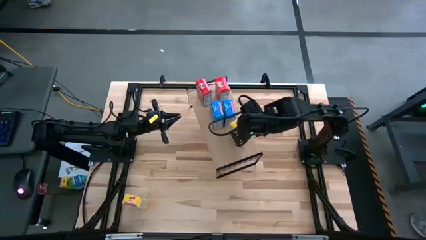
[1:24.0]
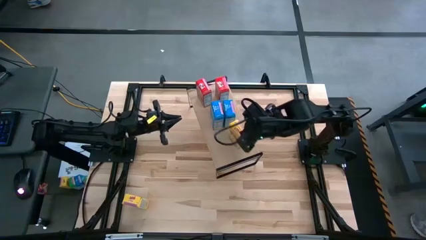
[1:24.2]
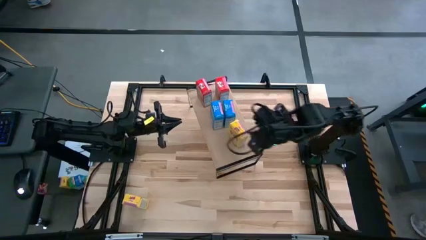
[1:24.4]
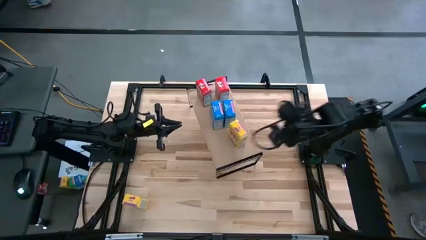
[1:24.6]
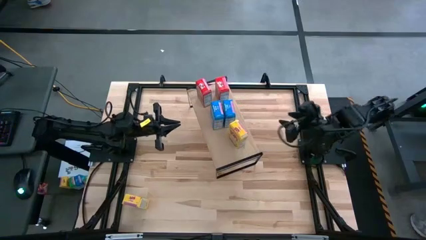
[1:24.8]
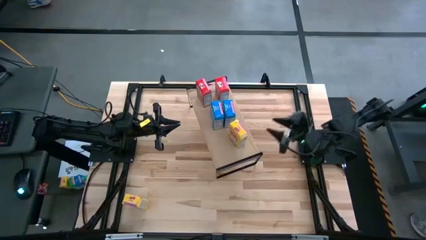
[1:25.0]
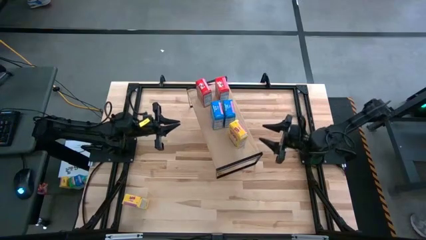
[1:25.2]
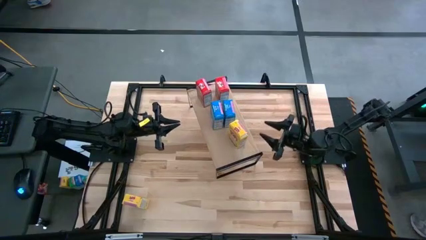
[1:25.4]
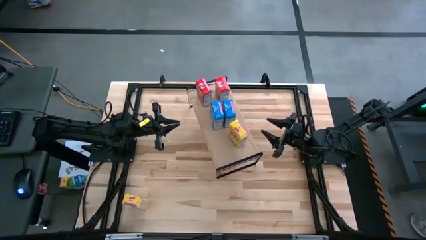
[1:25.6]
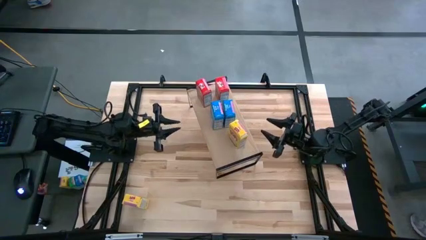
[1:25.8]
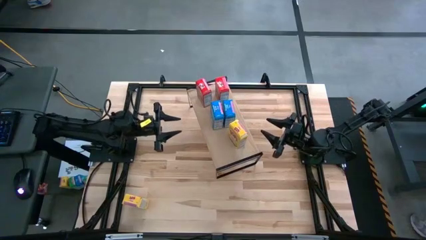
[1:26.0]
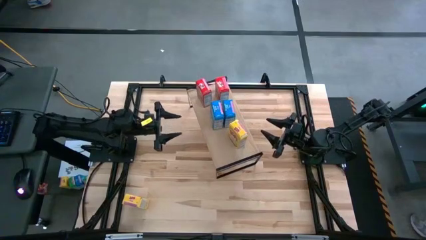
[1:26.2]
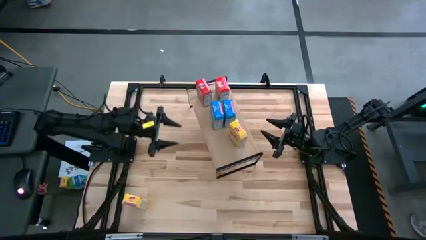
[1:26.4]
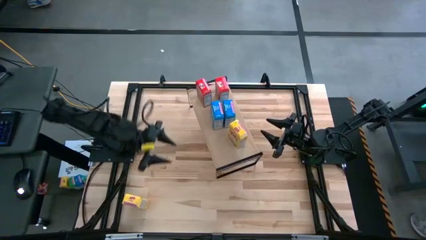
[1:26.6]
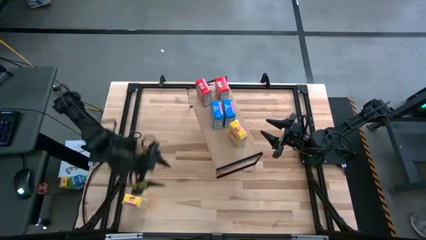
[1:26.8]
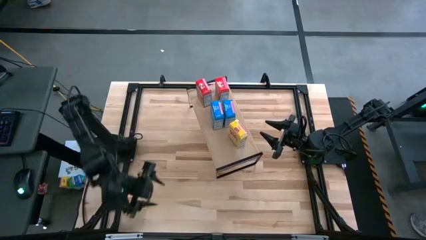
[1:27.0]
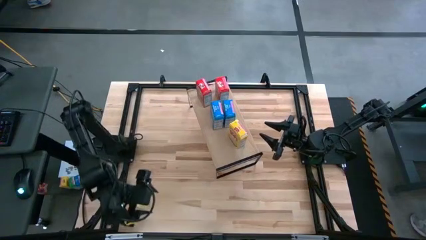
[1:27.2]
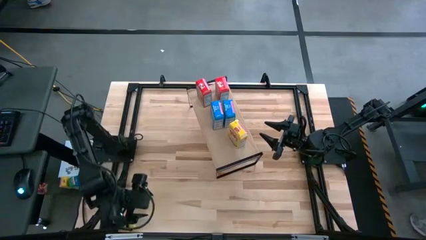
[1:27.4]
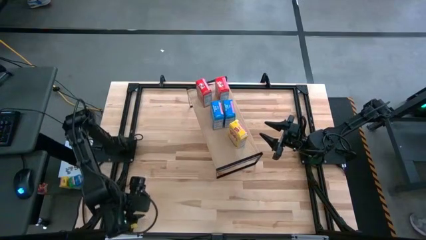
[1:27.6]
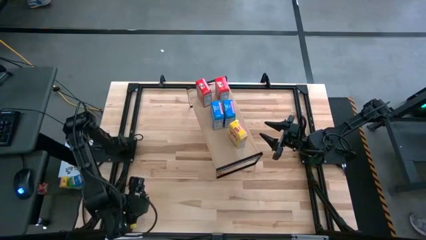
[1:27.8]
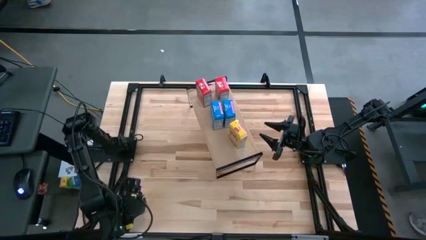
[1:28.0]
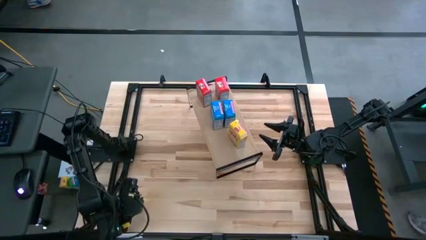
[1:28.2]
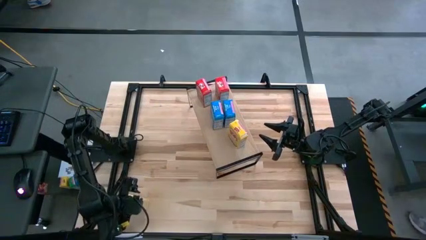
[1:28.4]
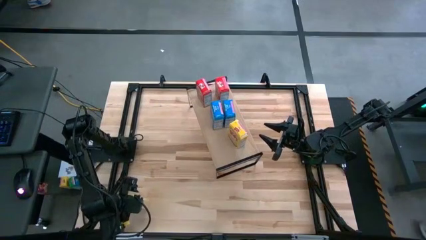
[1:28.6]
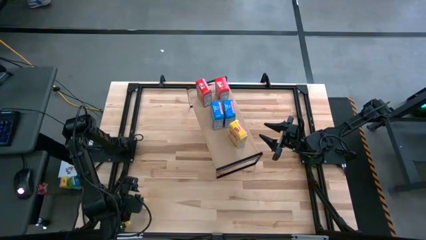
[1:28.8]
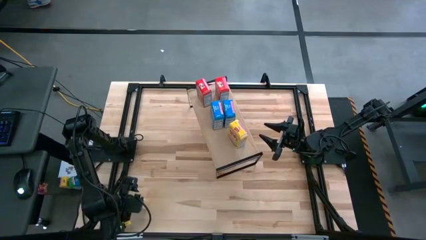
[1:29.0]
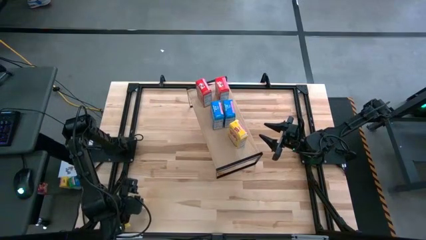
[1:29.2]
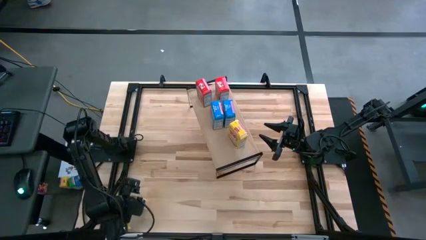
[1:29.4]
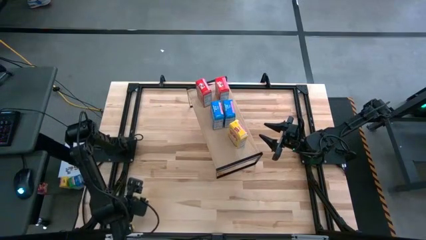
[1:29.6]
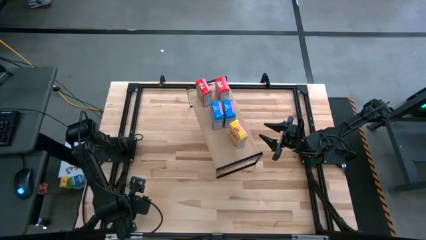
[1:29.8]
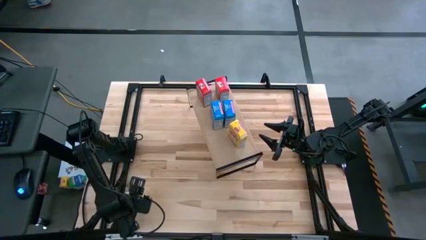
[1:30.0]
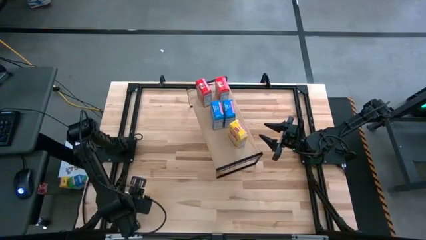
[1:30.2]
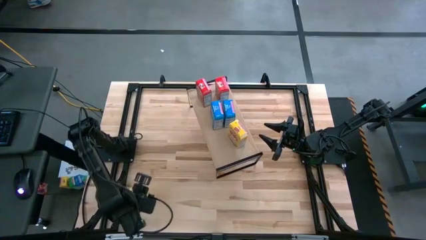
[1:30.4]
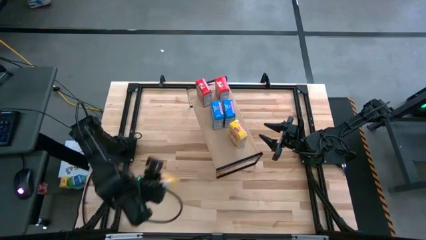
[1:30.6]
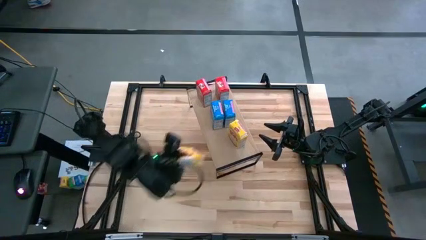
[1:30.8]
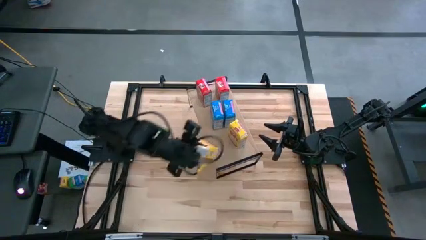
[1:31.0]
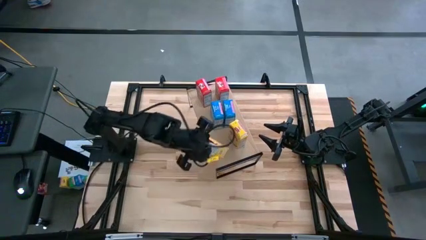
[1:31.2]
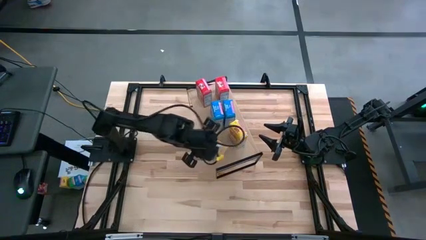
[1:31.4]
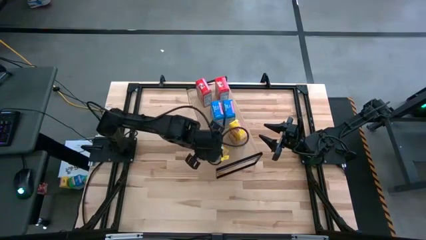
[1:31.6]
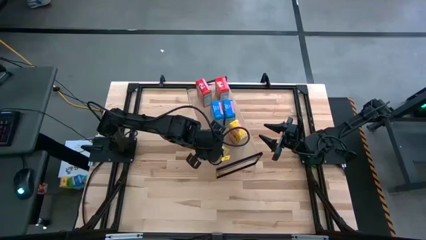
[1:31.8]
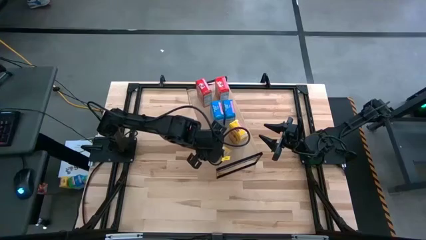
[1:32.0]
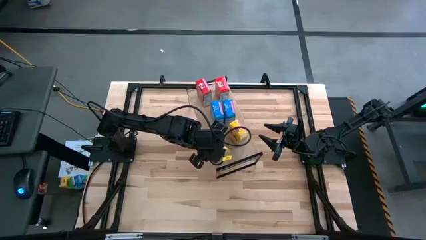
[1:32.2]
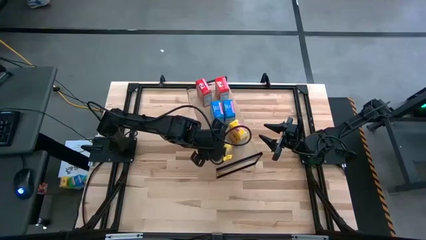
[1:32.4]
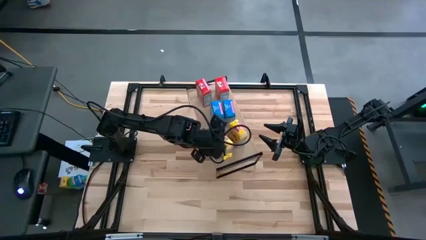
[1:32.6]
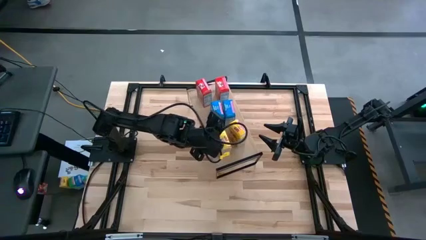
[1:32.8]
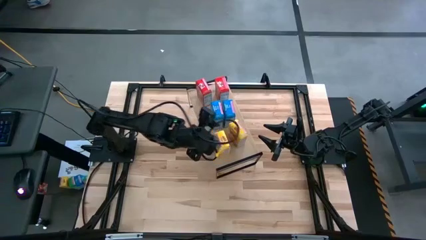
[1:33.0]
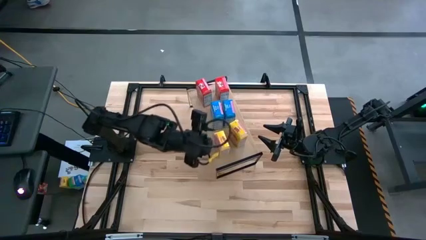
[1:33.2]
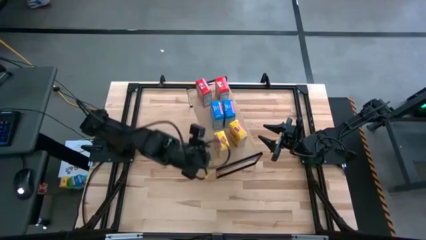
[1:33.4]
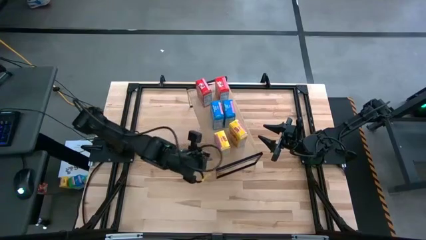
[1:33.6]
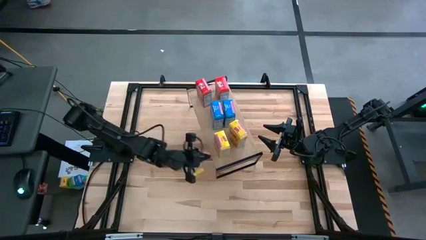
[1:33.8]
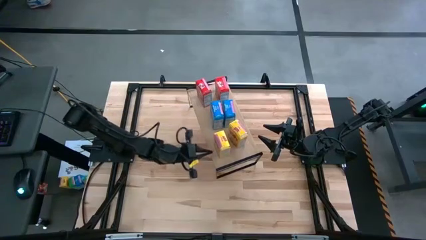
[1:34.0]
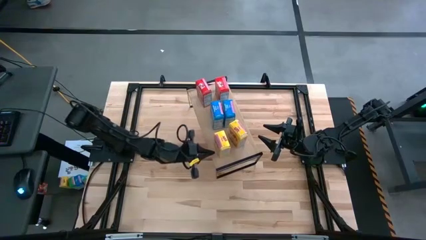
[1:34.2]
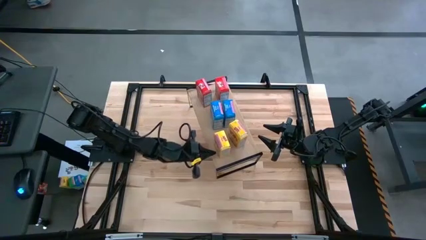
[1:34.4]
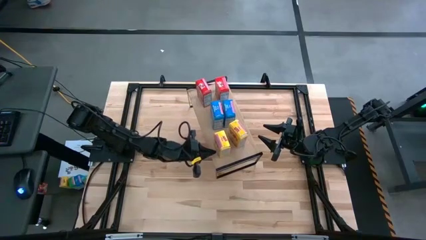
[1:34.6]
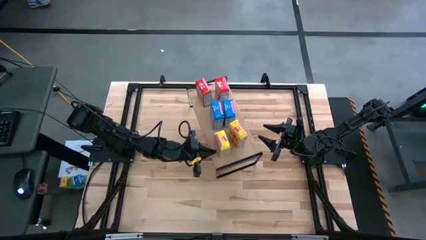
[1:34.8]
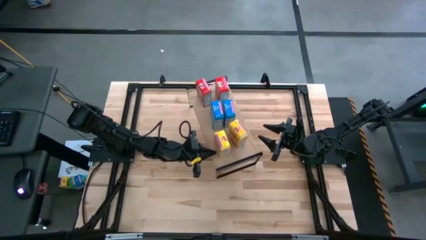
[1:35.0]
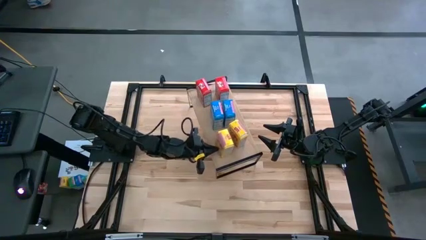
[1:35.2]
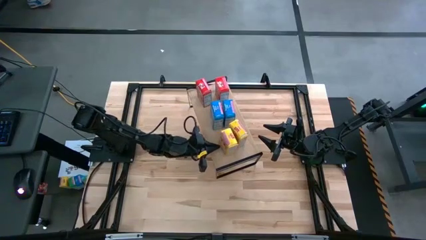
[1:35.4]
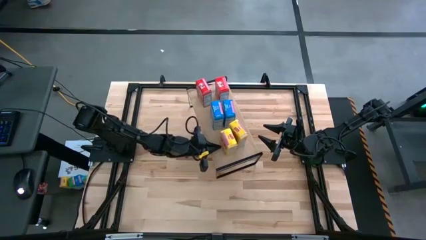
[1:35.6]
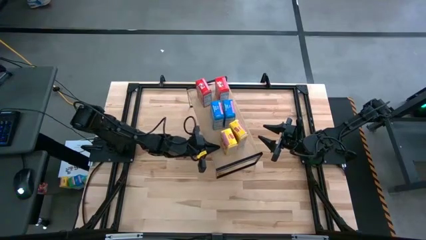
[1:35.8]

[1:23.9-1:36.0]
Task: Stack cereal on shelf
Put the yellow cereal box aligned with the other yellow cereal box on the shelf
